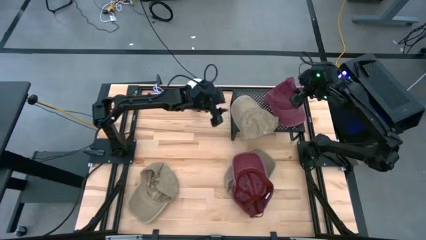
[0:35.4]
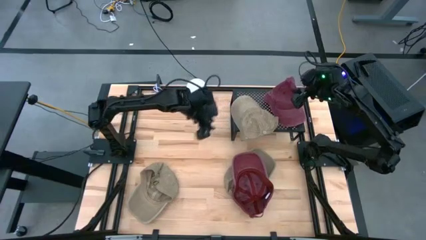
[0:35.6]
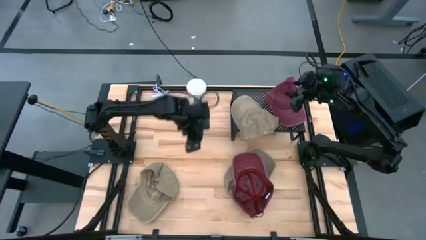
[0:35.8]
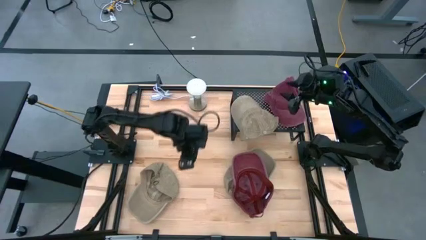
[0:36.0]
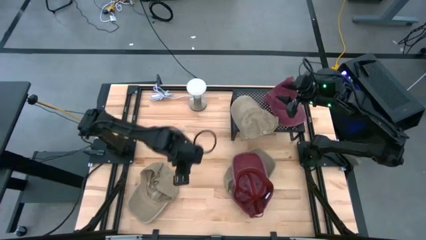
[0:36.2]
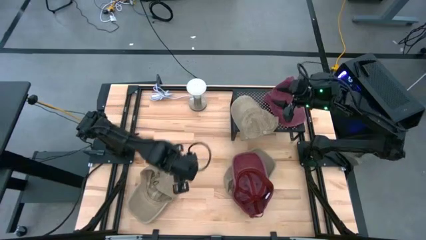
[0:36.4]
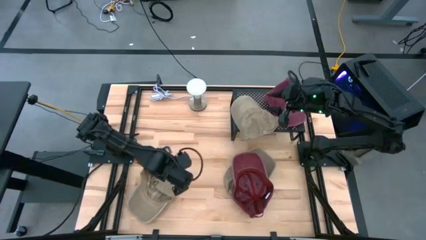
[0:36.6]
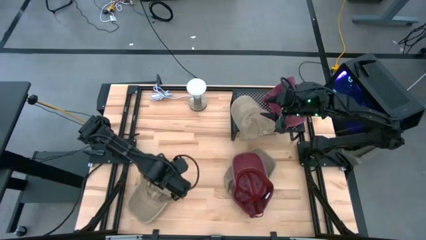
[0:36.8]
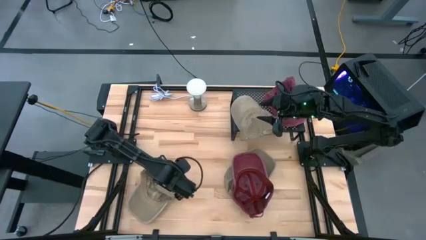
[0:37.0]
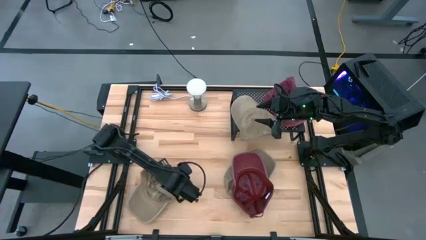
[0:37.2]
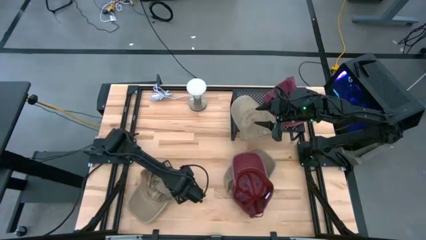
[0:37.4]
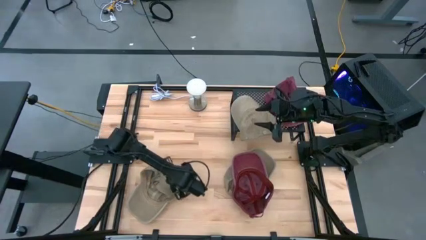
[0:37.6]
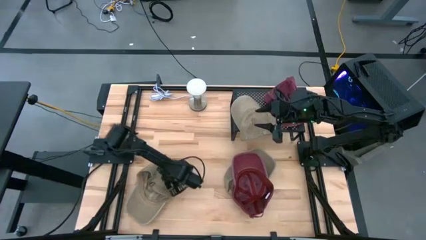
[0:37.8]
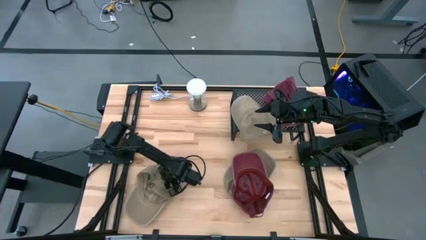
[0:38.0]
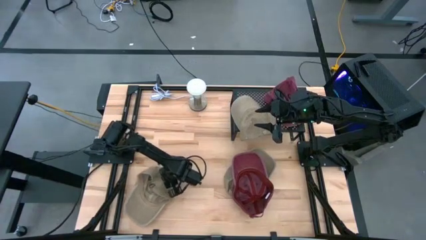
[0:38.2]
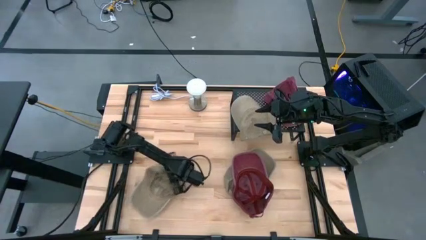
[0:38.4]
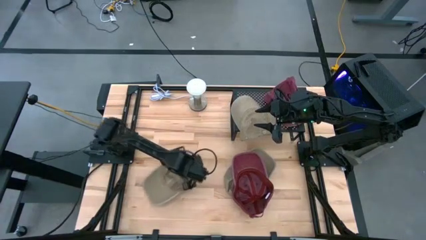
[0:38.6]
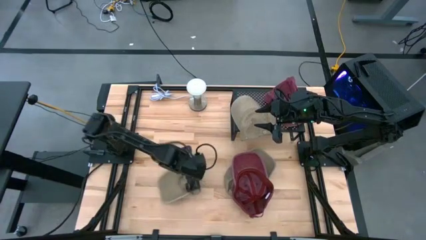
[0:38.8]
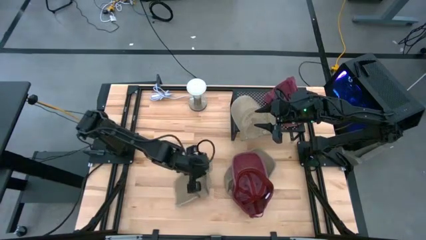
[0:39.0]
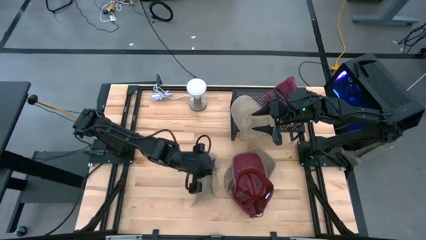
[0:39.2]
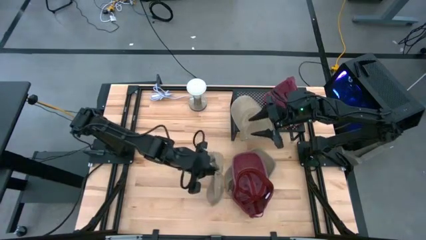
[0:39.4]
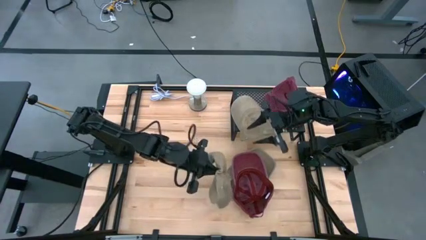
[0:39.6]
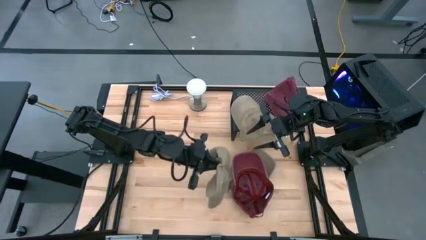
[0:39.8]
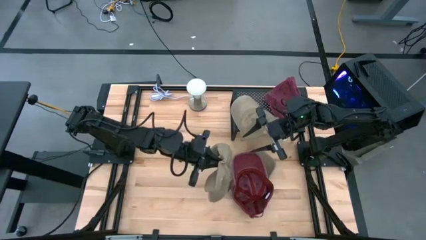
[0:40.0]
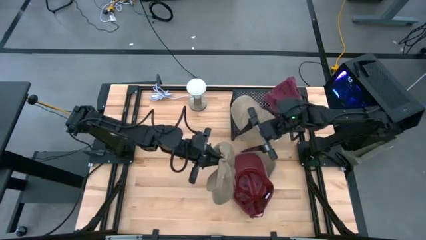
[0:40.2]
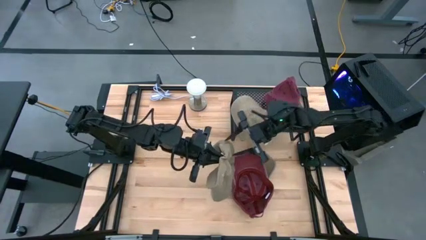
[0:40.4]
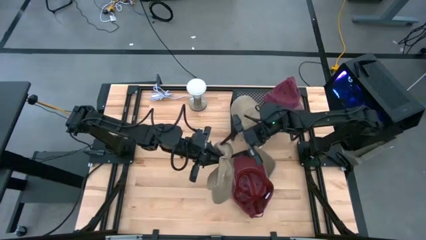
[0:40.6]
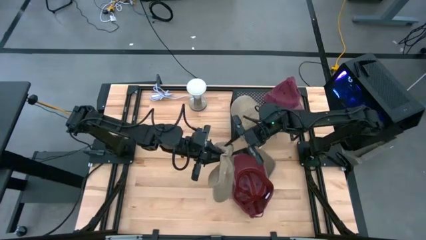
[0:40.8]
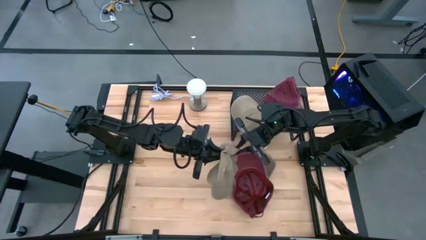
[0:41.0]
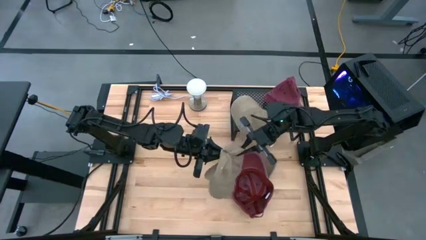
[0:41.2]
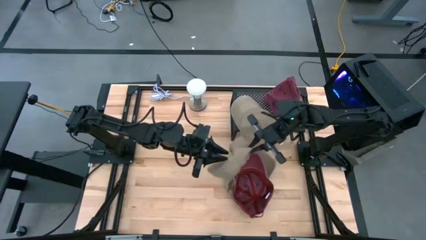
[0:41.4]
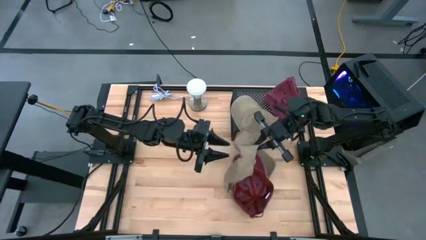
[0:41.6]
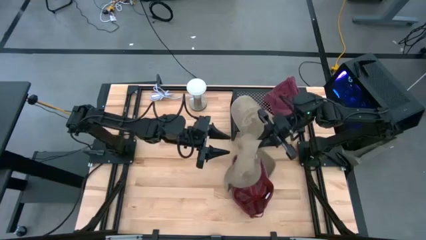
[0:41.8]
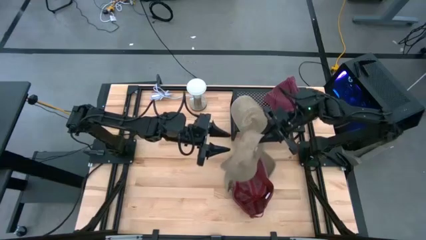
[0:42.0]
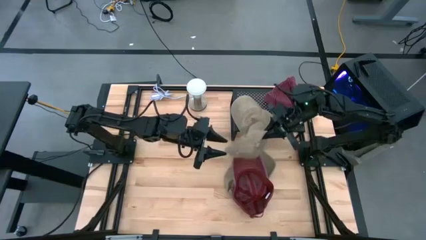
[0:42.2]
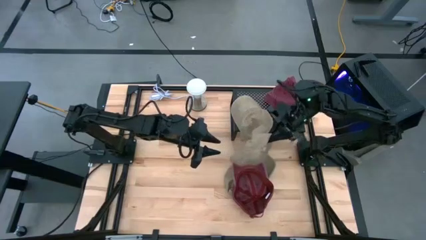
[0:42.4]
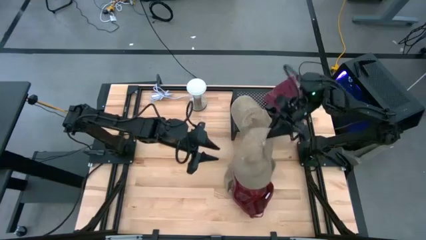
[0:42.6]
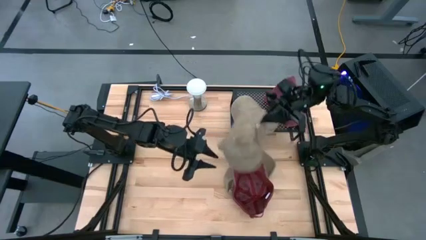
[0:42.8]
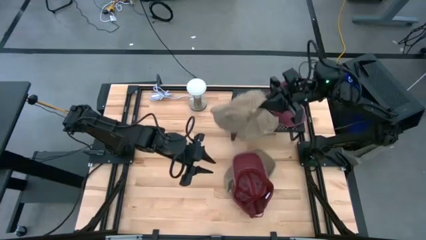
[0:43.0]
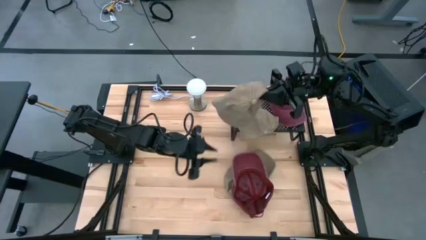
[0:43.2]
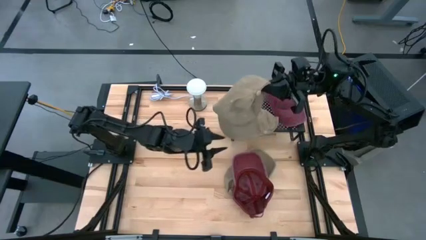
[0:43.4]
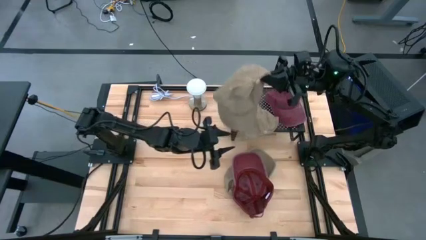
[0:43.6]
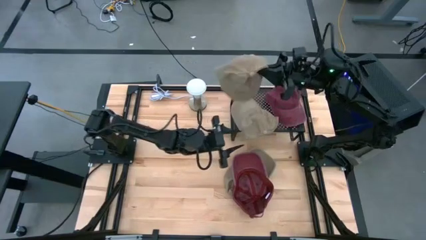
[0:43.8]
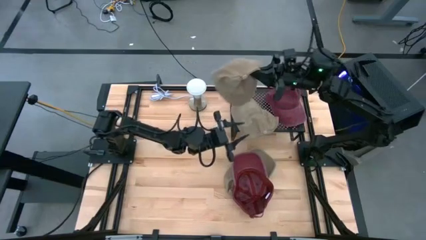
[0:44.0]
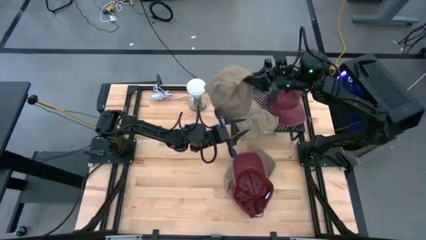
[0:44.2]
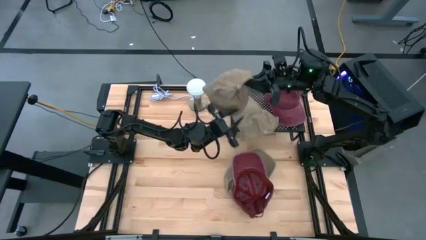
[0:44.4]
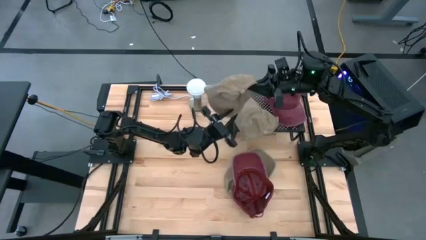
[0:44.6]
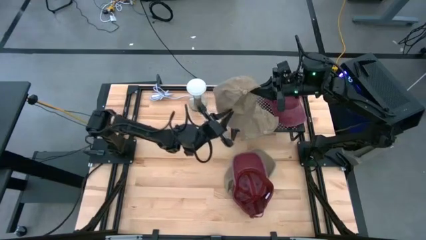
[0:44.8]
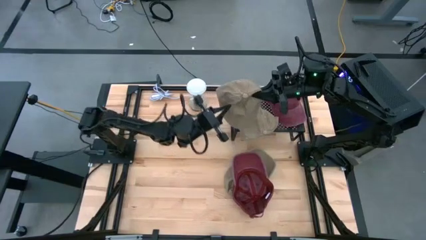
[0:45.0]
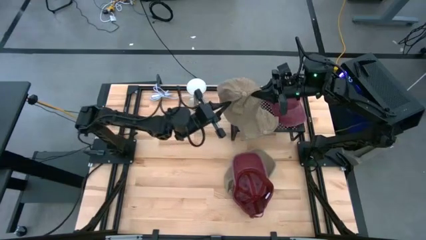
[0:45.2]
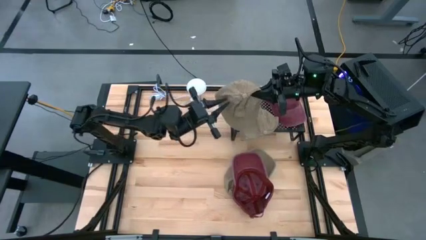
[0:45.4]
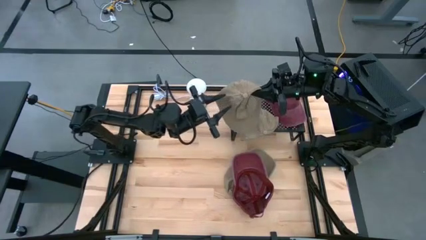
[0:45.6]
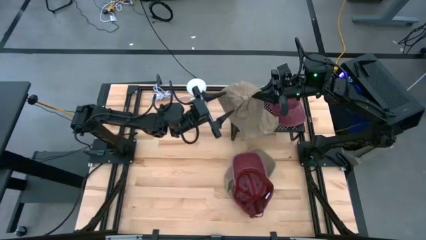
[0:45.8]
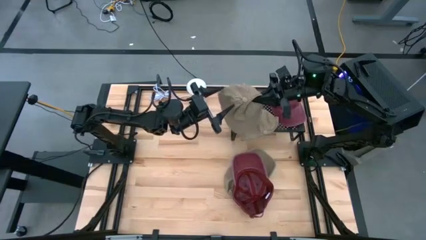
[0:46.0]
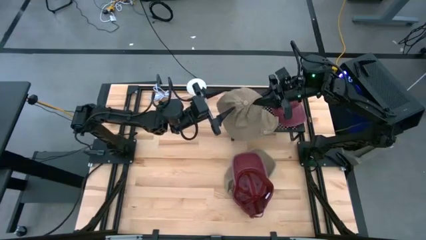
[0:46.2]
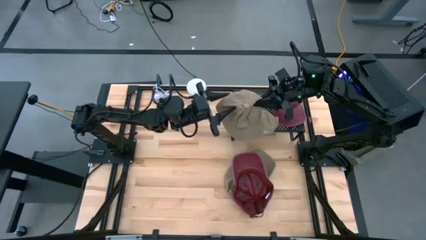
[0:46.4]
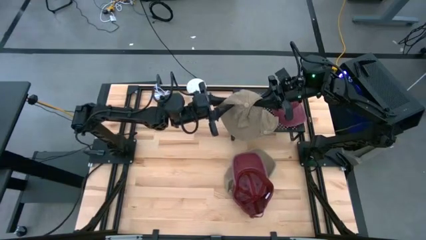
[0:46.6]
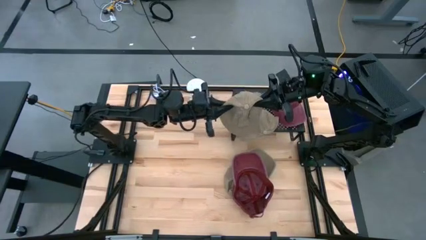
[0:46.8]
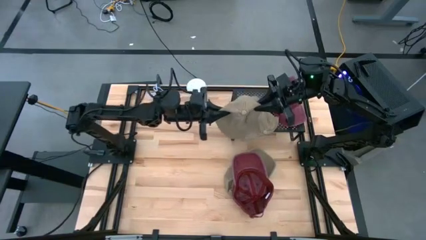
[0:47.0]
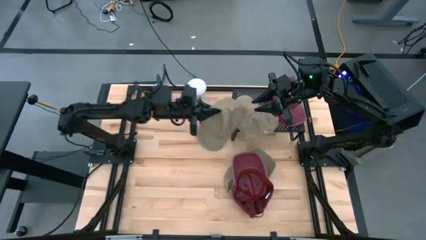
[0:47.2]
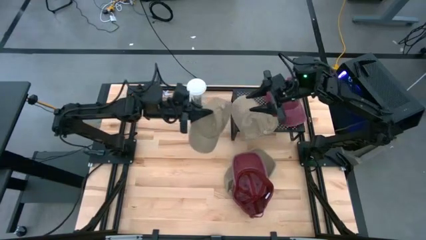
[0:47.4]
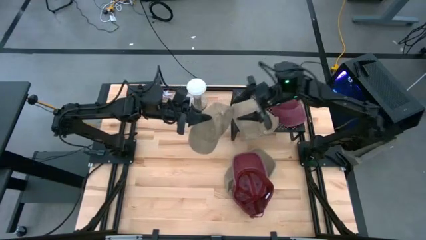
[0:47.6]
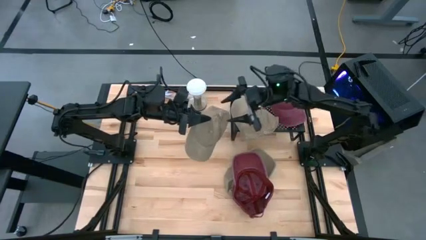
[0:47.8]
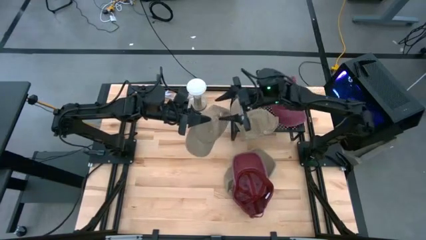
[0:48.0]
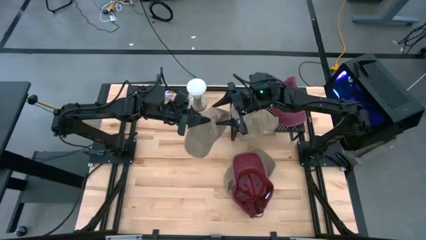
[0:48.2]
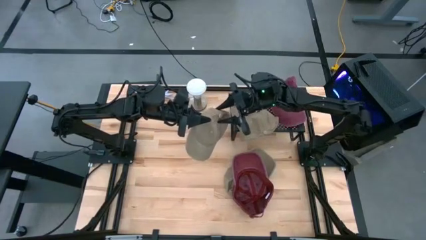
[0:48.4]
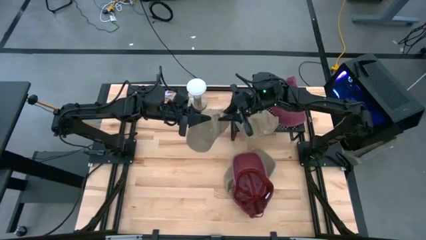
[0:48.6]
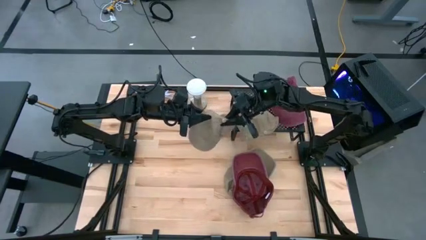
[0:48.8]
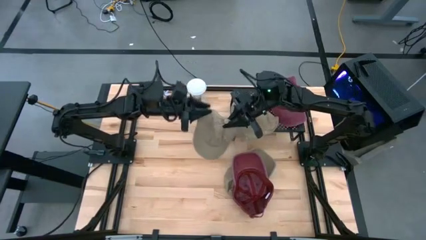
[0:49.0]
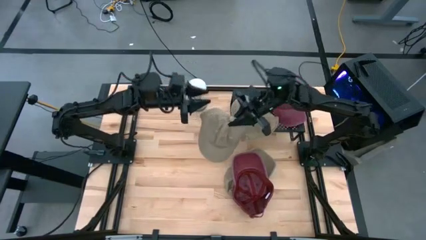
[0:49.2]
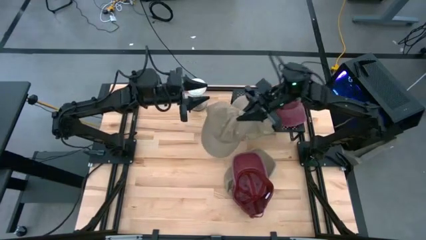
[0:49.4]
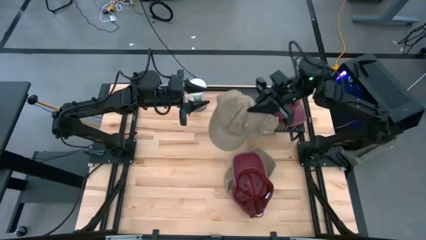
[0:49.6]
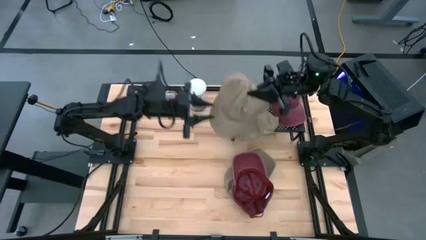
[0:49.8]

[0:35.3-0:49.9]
Task: Pick & Place hat
Stack the left brown hat on the brown hat on the black shelf
